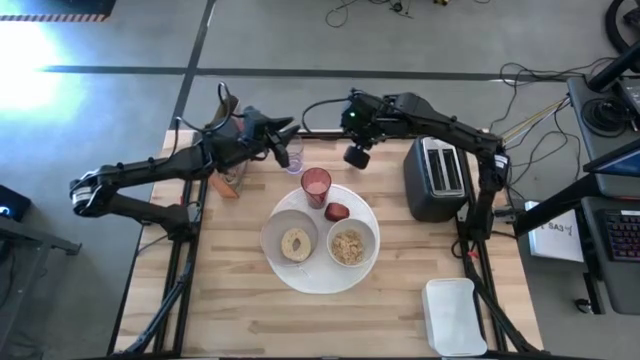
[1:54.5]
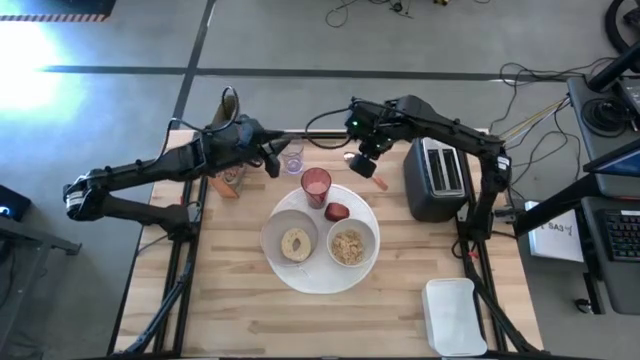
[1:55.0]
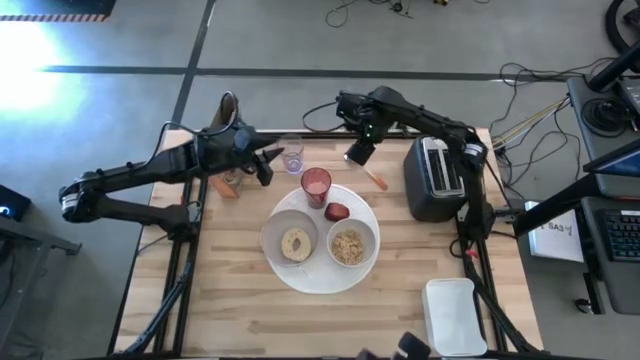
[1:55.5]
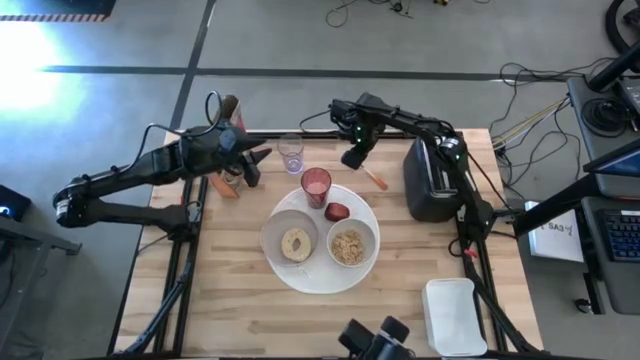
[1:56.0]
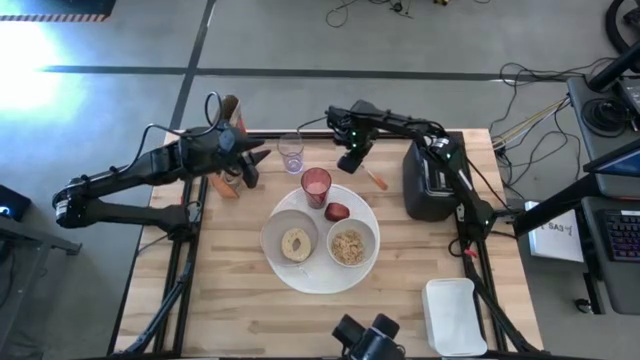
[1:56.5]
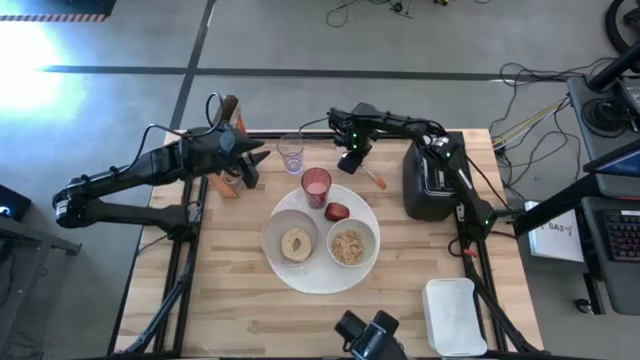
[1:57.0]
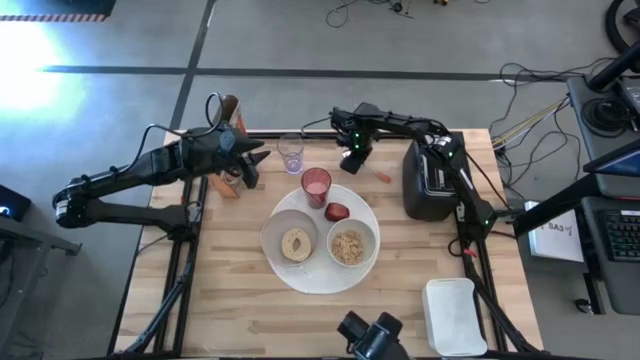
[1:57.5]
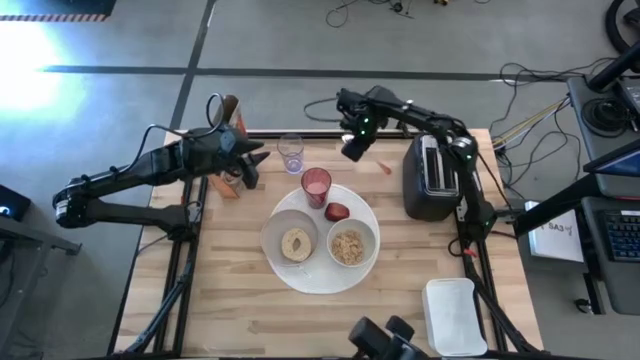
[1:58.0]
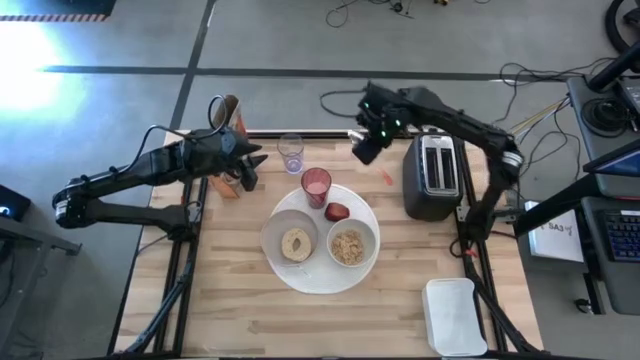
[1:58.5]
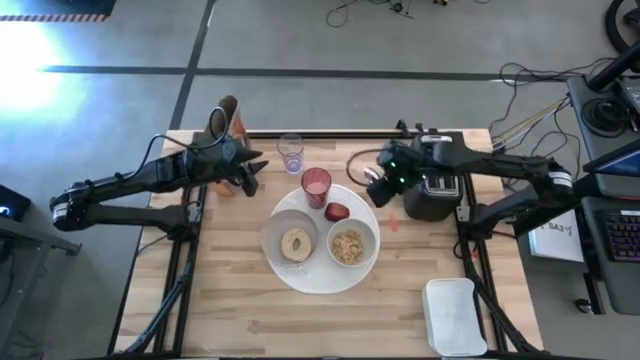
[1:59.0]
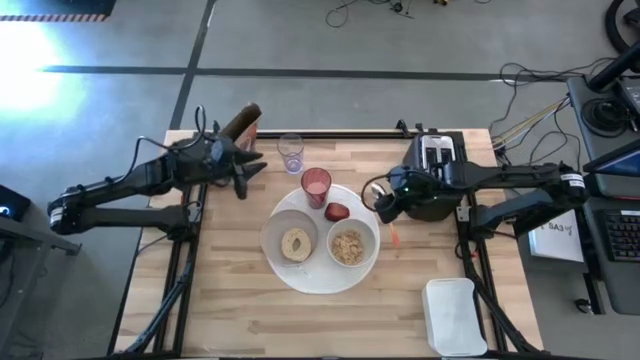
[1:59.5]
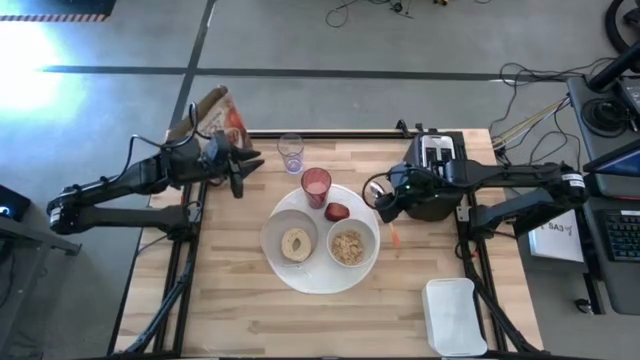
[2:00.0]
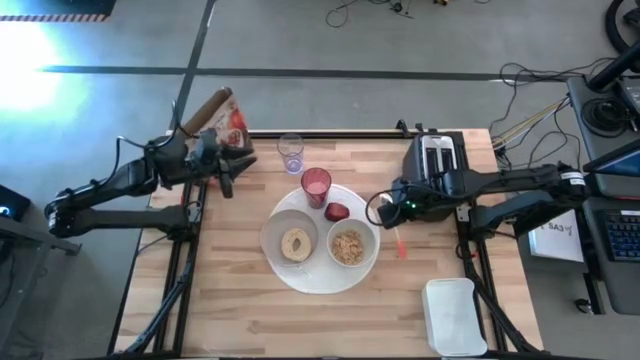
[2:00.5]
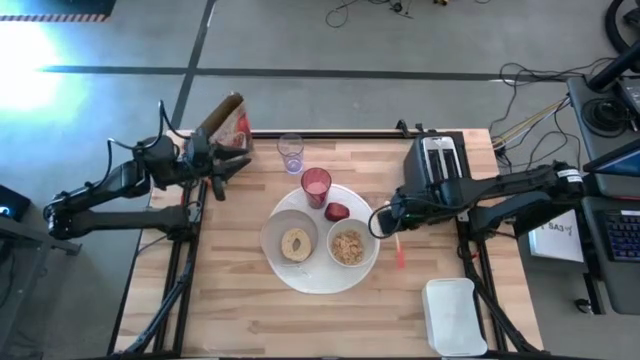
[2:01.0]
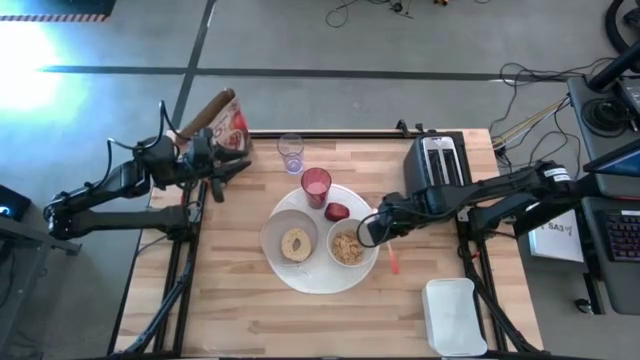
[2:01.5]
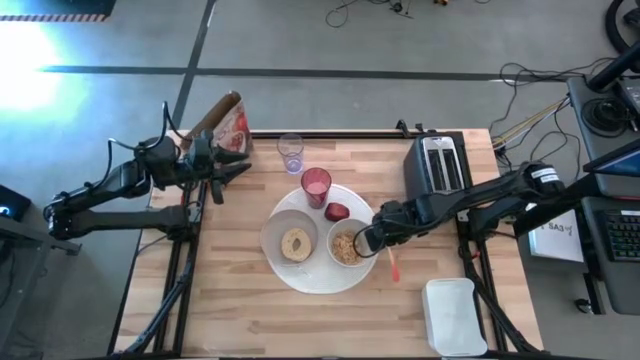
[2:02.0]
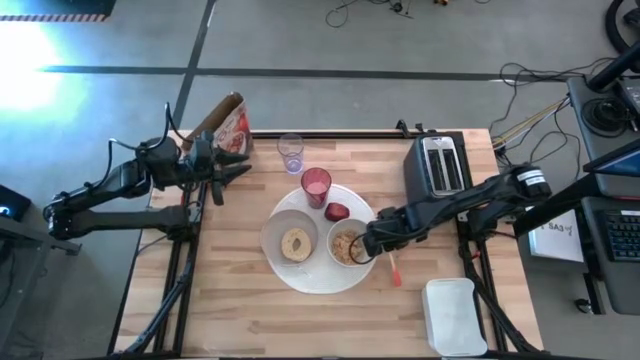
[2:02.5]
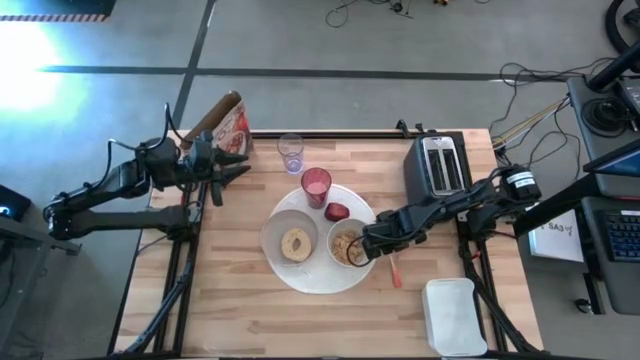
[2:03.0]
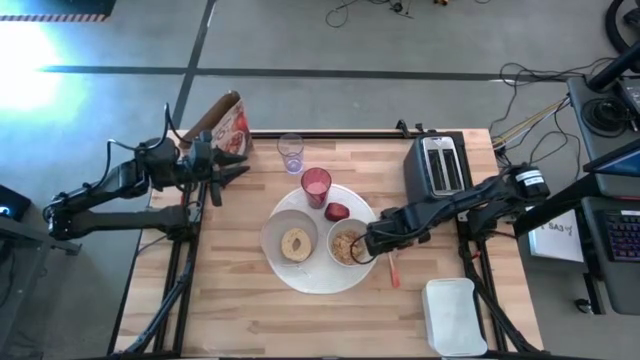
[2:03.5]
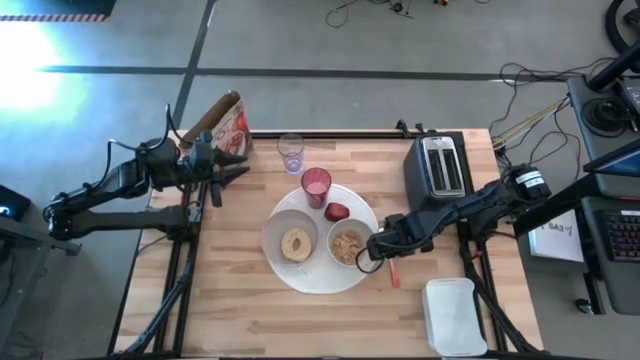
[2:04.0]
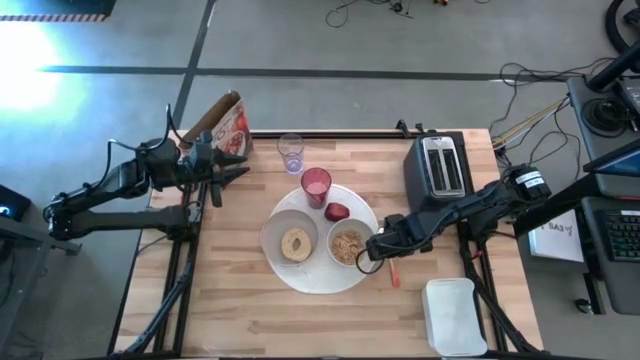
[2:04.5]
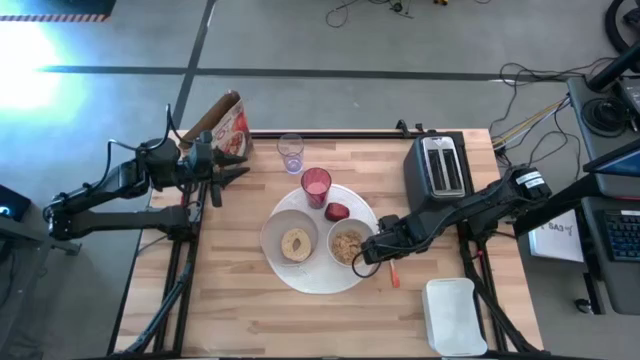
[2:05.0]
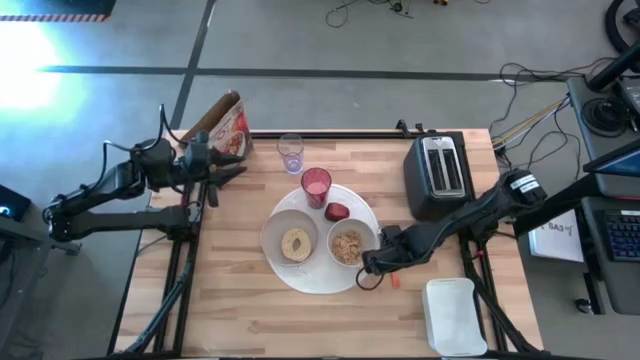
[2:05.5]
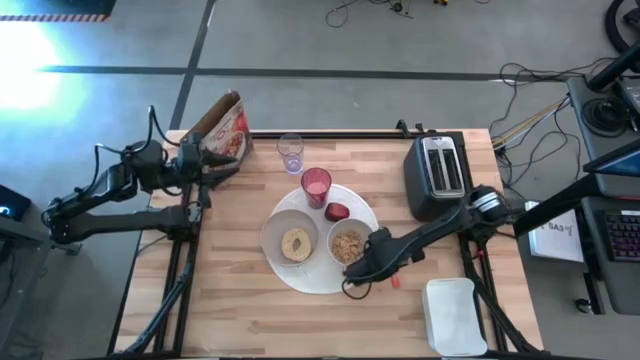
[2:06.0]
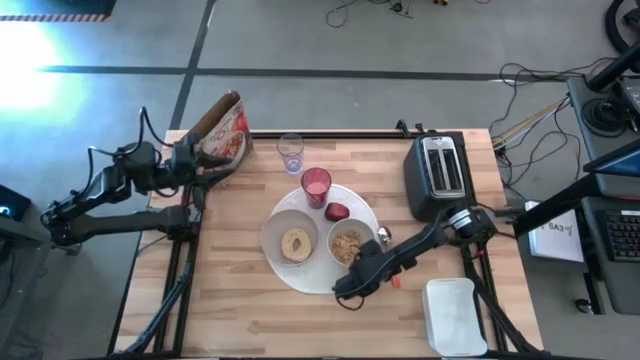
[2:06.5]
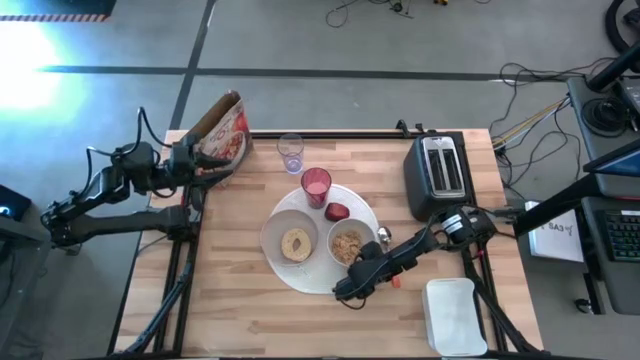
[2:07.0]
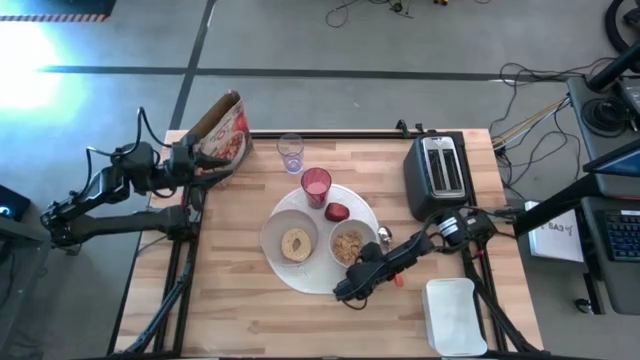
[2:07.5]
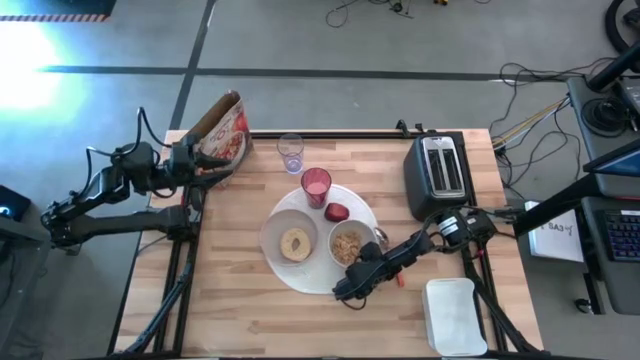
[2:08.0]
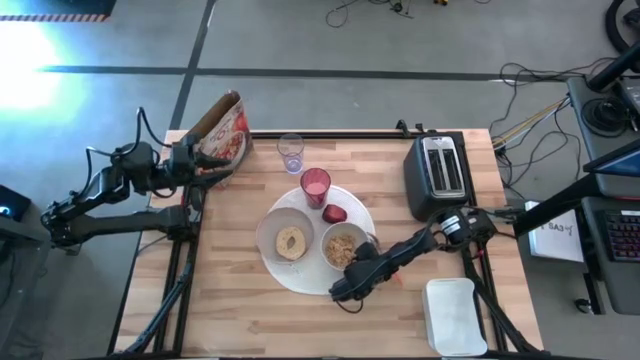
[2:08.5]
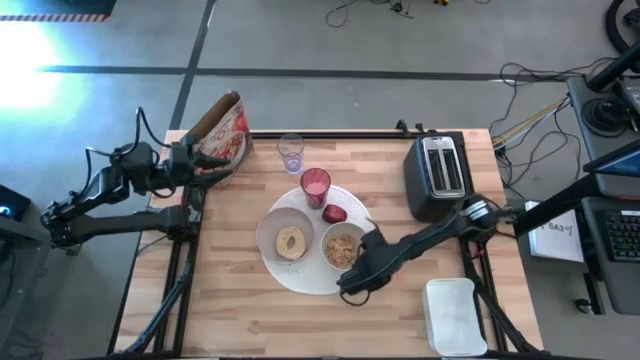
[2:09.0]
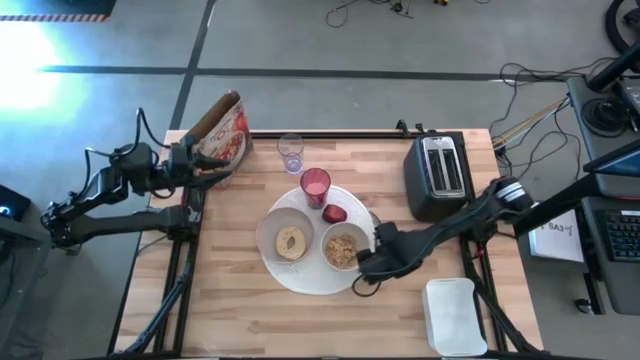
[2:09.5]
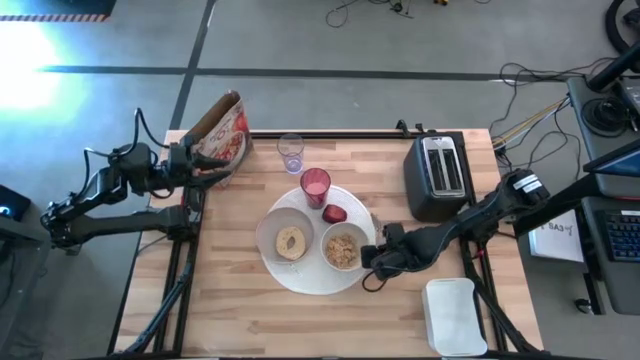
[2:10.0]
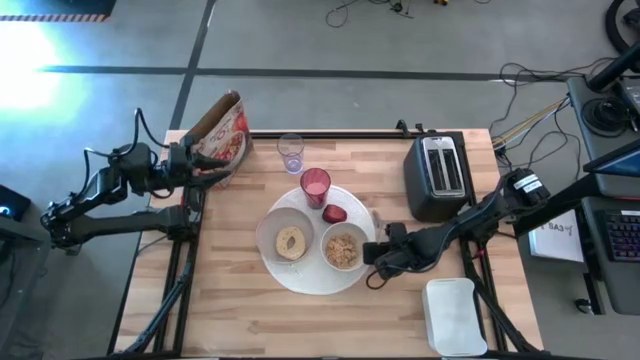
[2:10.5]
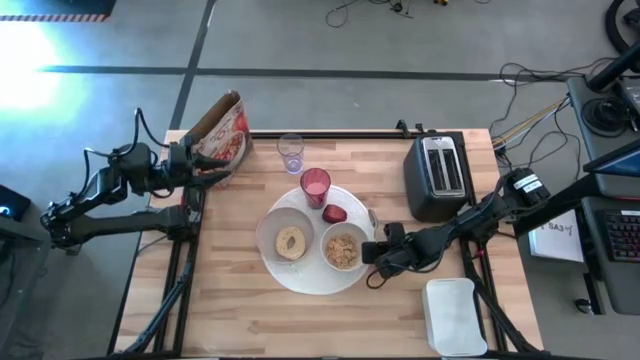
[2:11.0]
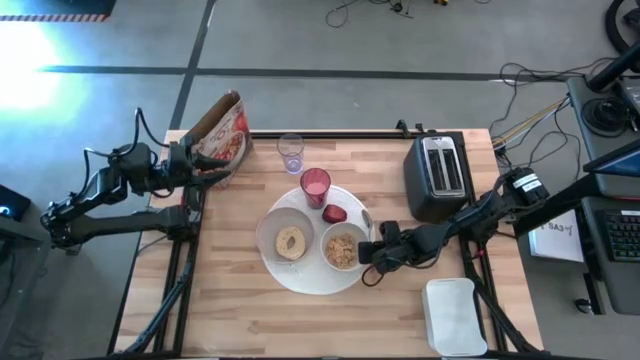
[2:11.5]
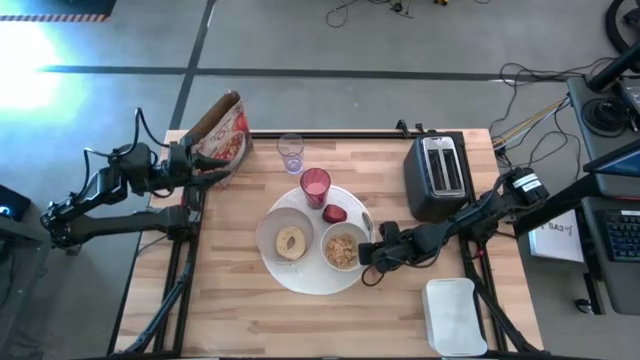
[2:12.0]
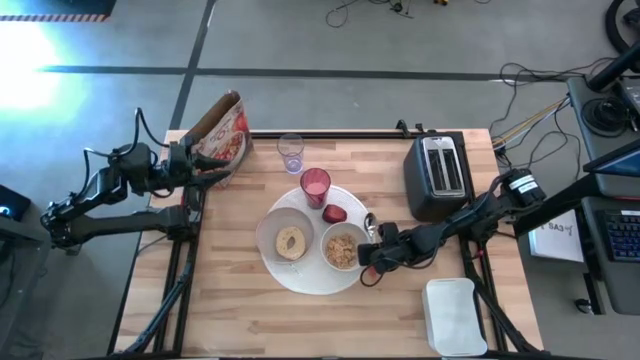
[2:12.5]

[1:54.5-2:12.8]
Task: Arrange a breakfast setting
Put the orange spoon on the white table mat to the right of the white bowl

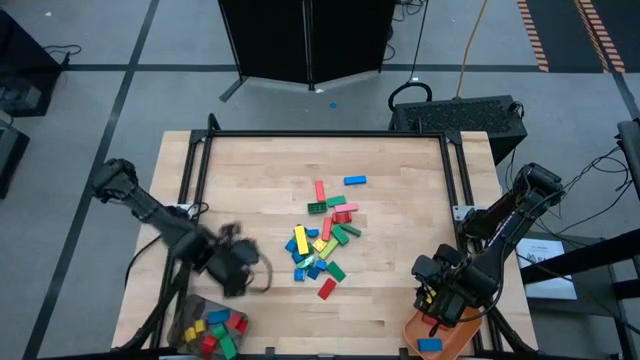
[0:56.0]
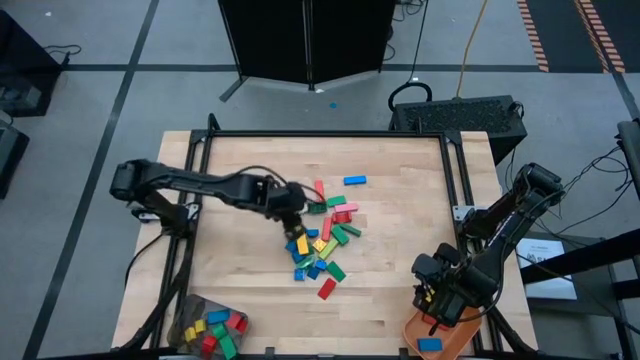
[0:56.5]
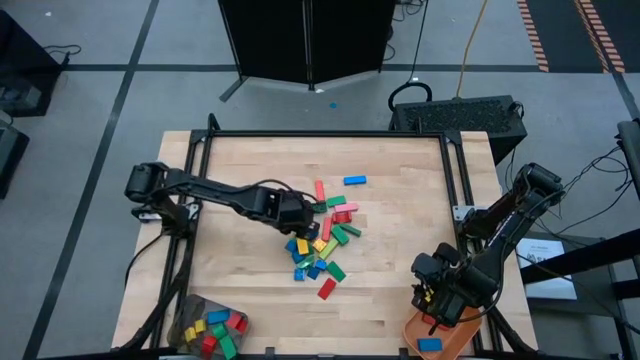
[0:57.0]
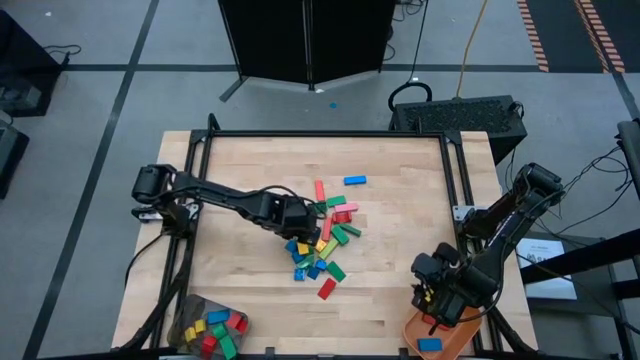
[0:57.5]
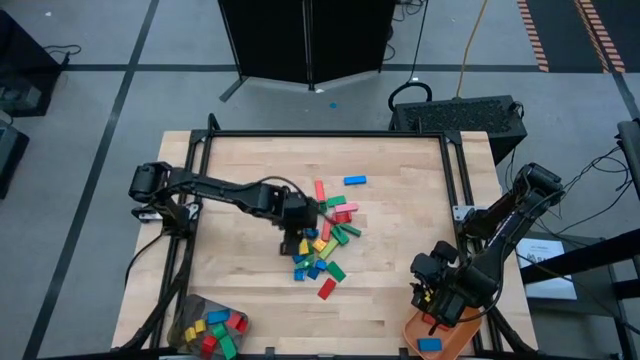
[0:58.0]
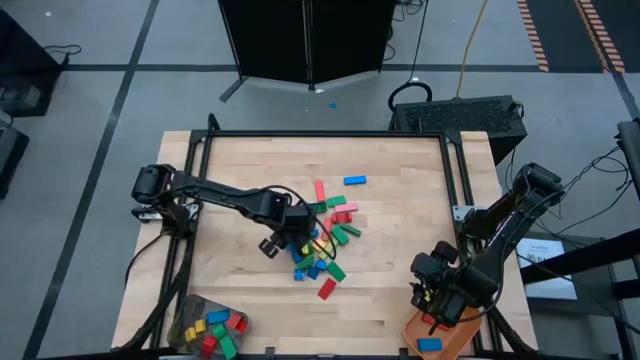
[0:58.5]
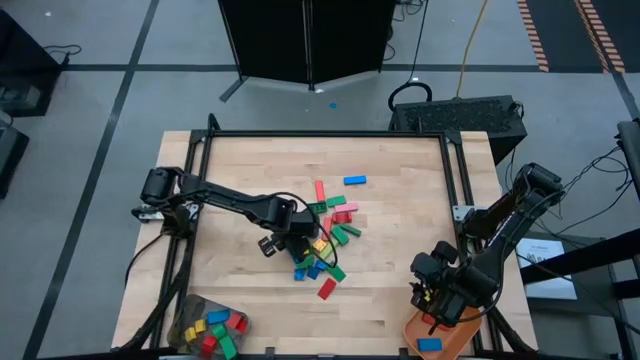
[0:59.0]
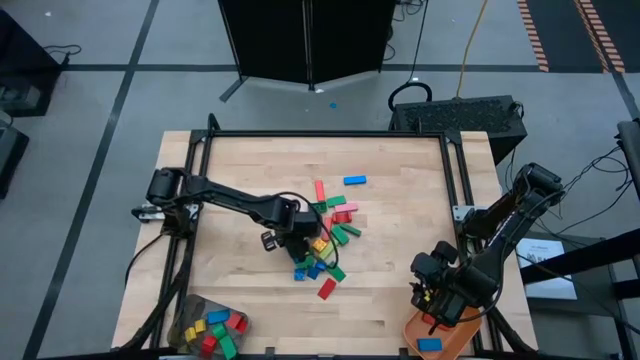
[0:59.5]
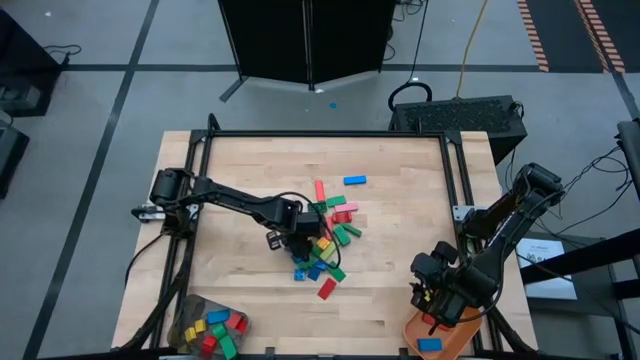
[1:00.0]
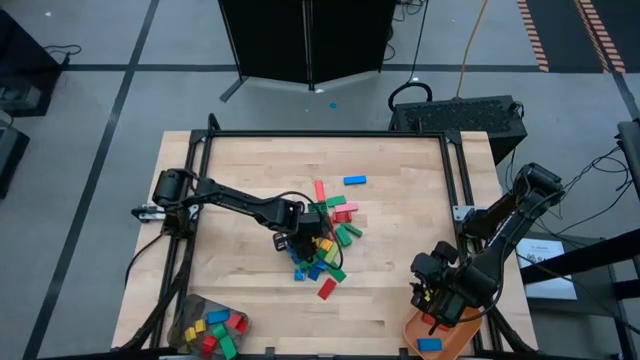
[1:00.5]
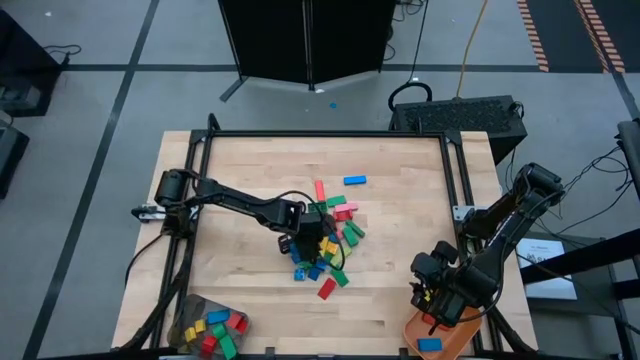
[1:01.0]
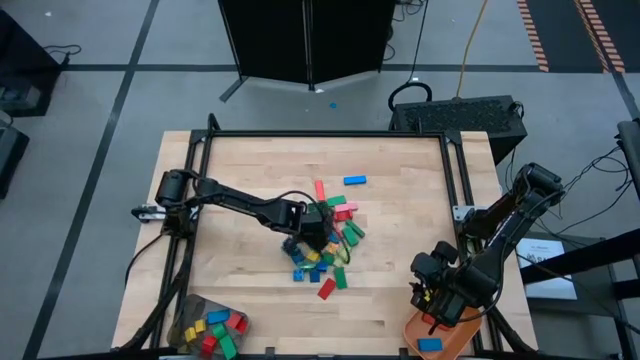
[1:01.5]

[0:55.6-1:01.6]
Task: Sort blocks by size
Put the yellow rectangular block into the orange bin
